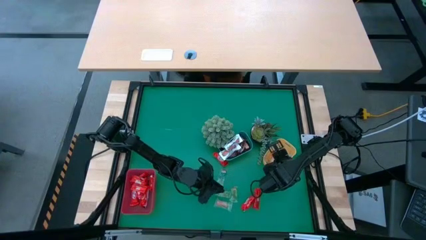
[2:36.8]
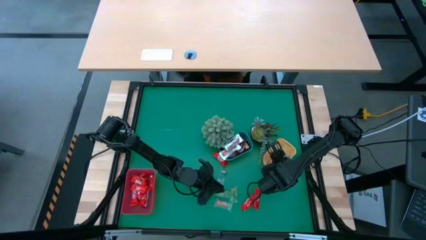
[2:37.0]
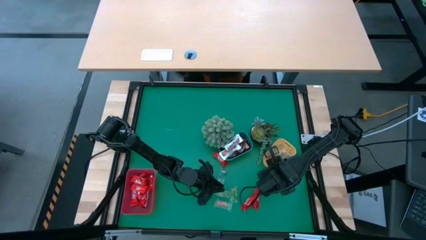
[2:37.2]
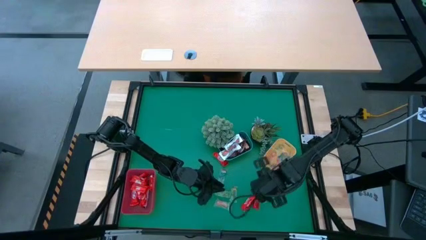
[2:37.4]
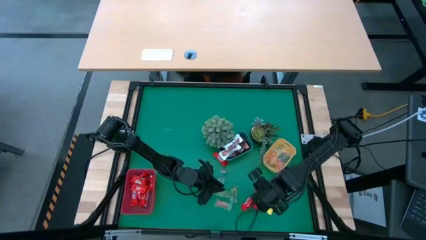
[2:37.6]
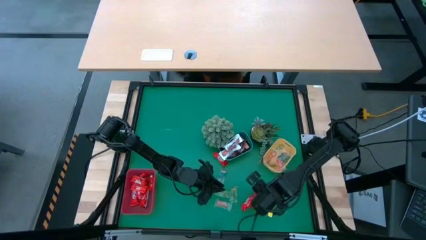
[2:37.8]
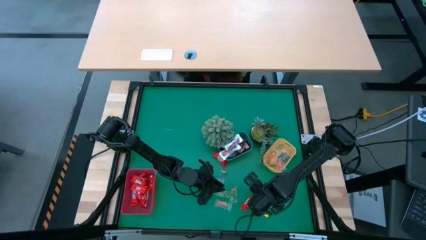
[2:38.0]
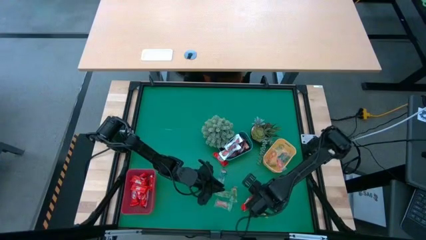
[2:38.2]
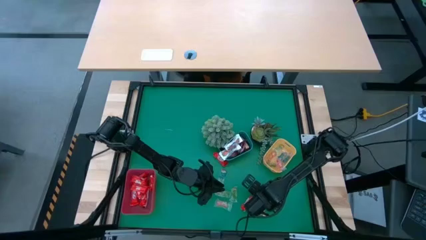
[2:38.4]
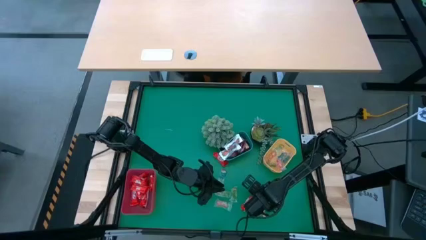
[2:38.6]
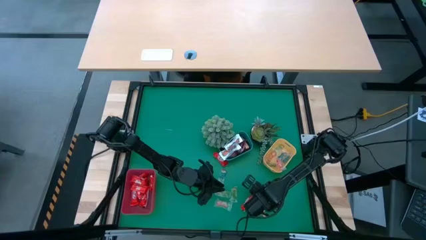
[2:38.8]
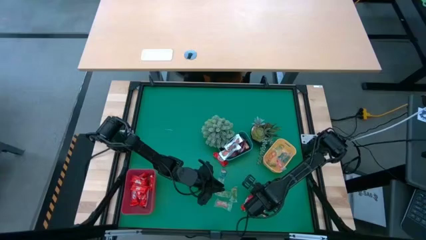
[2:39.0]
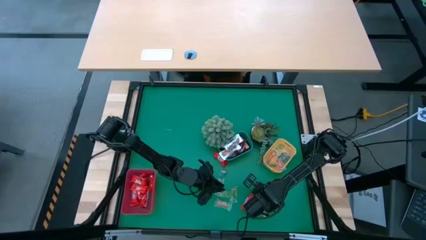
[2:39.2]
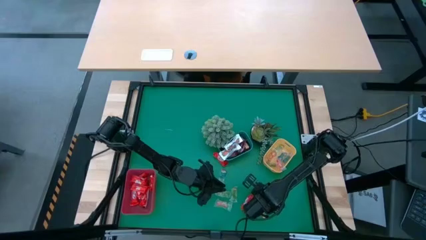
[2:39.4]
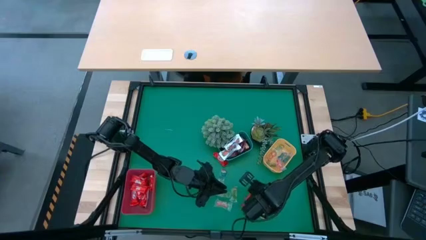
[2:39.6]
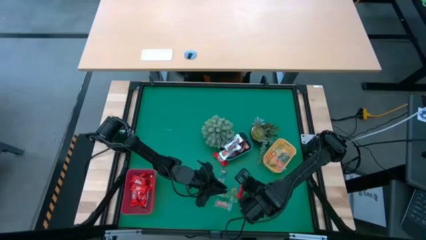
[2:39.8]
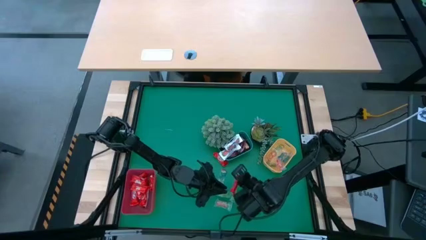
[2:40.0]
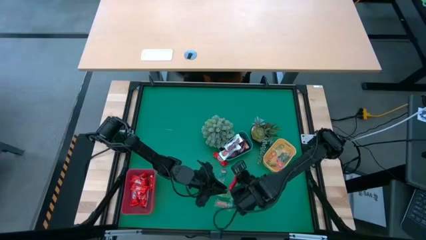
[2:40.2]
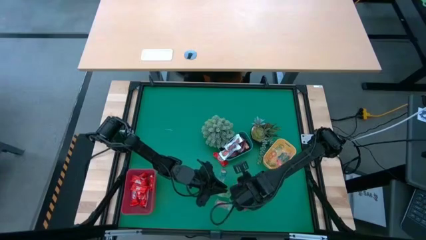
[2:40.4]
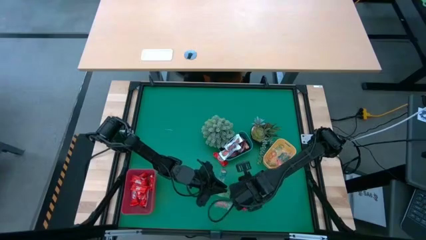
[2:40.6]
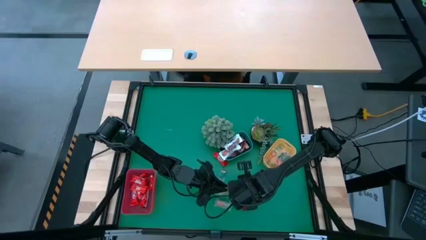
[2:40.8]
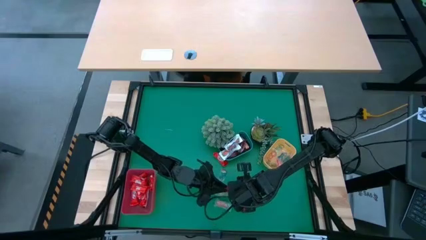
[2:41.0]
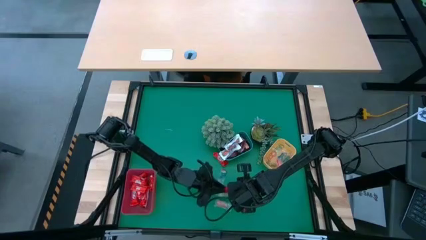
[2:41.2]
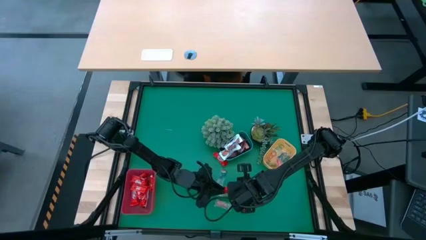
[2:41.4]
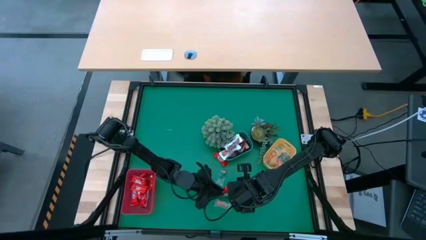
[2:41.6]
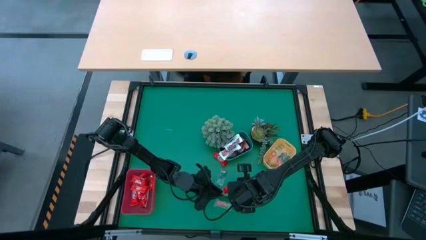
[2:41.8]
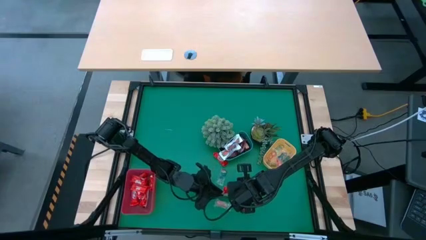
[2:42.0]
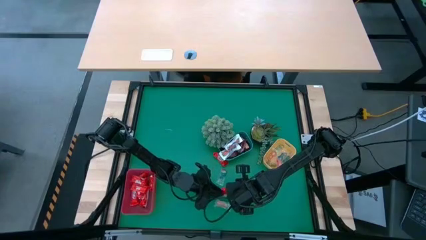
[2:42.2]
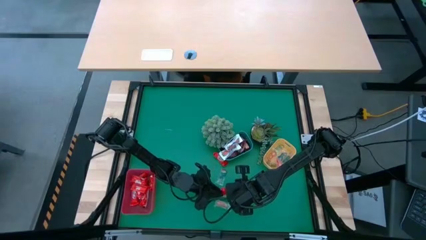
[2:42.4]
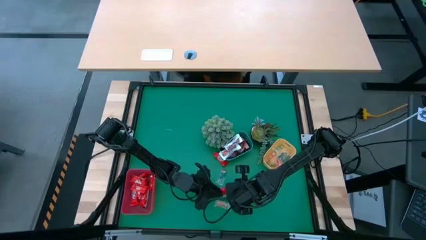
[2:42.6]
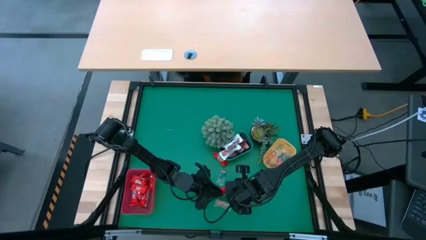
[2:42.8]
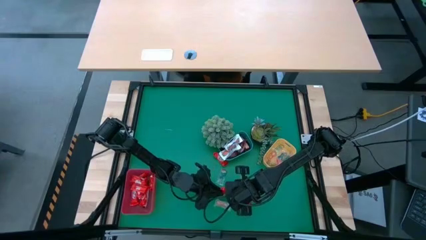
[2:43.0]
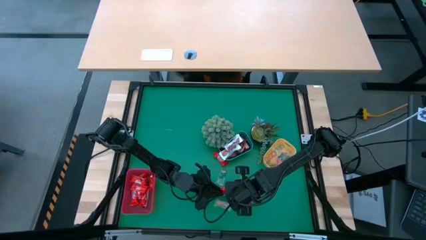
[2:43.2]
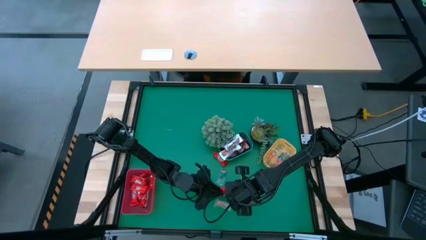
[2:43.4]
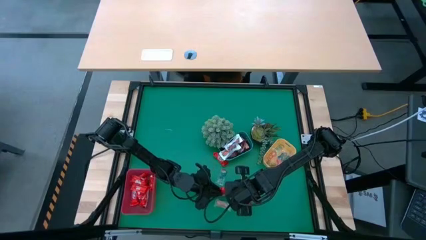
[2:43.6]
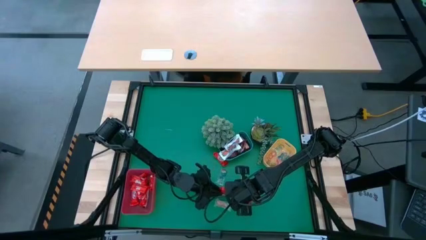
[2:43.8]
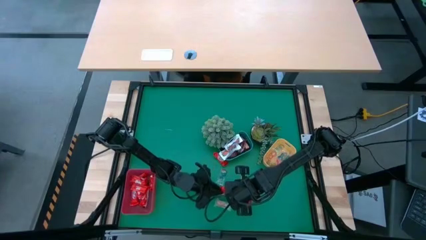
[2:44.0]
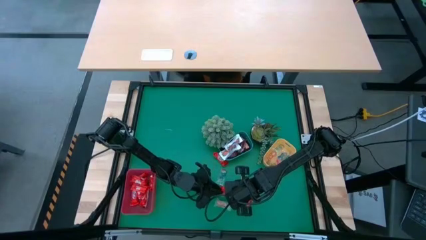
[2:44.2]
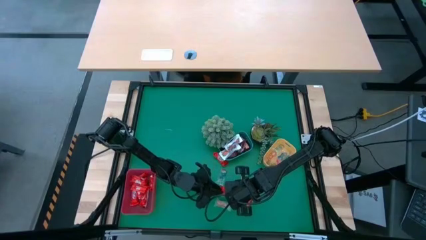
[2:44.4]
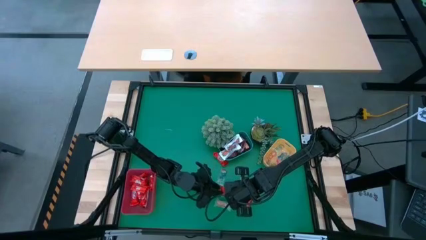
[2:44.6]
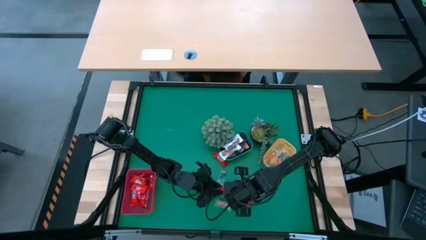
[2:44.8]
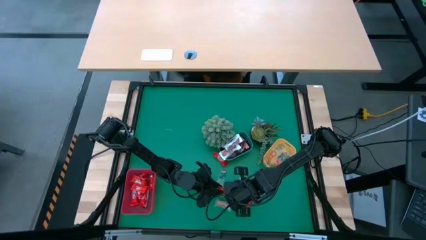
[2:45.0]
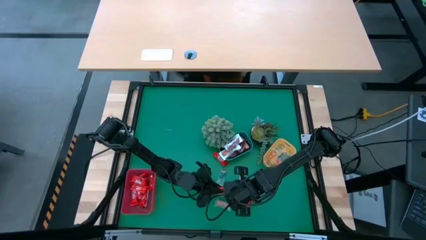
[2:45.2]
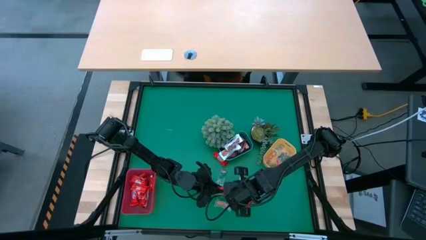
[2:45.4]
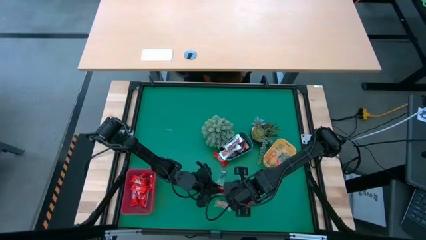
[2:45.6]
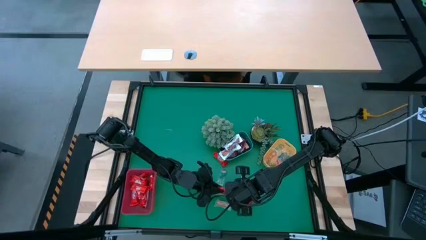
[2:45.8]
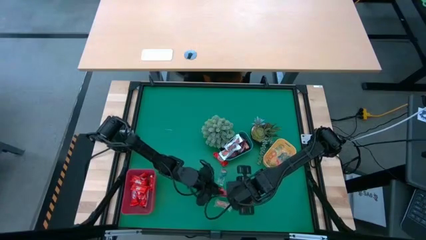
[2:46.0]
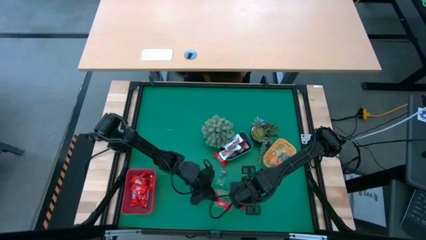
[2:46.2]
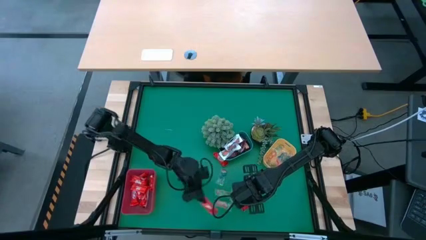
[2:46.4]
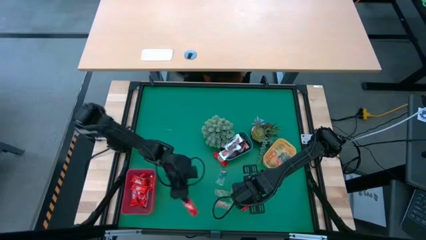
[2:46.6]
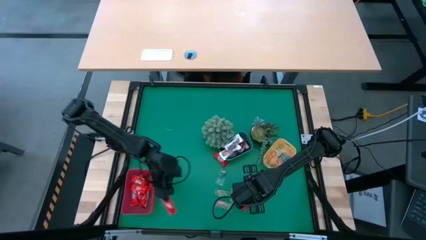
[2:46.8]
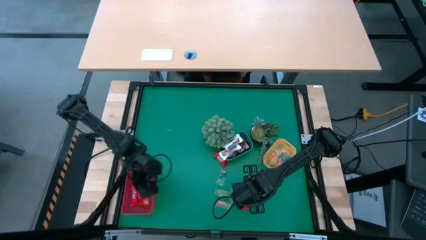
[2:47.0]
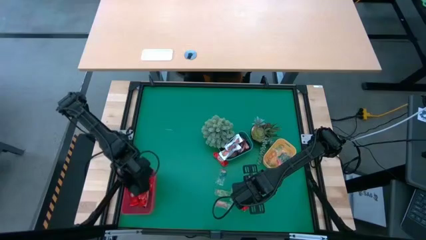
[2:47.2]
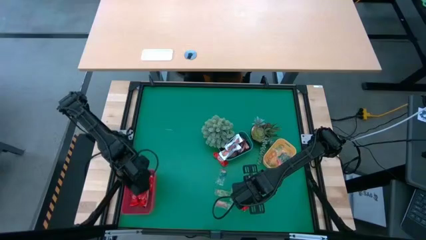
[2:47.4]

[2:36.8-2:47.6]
Task: Organize candy in baskets
Put the red chocolate into the red bin

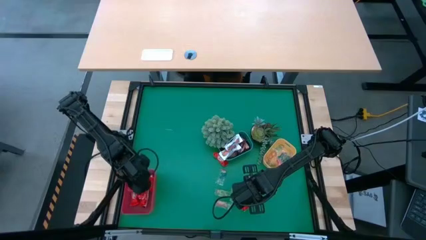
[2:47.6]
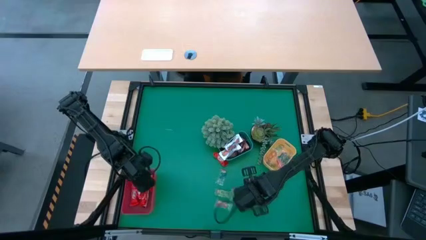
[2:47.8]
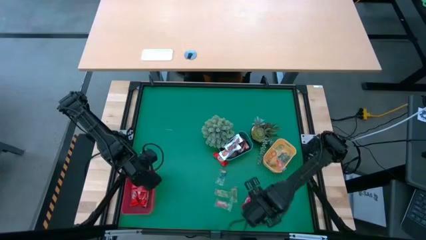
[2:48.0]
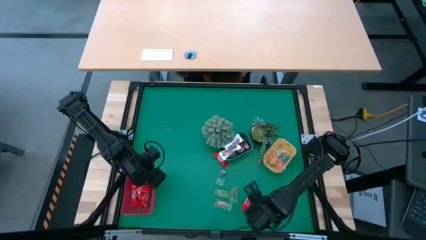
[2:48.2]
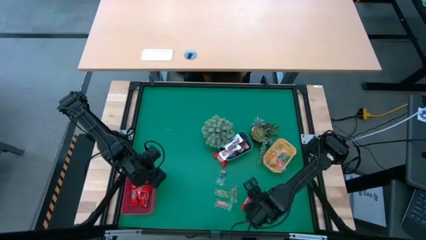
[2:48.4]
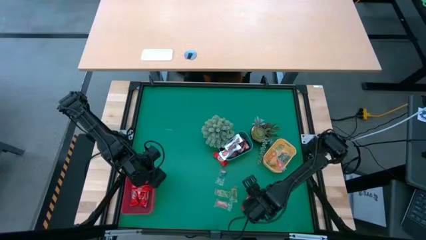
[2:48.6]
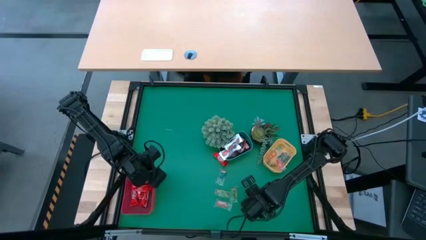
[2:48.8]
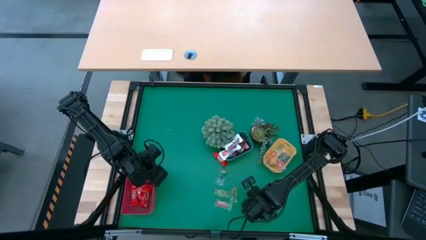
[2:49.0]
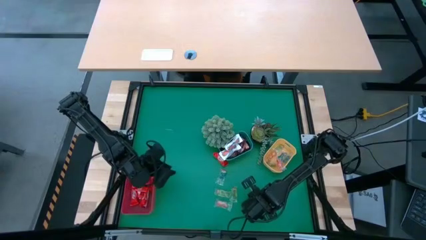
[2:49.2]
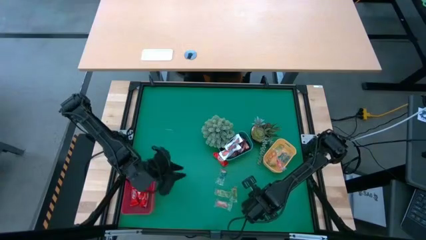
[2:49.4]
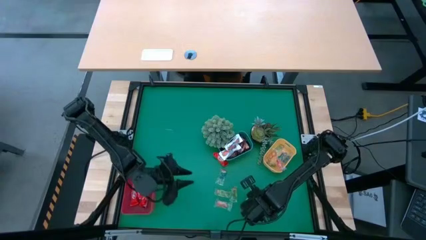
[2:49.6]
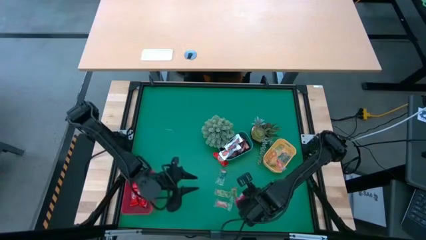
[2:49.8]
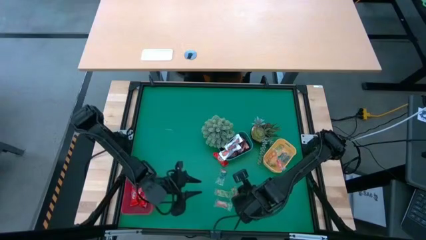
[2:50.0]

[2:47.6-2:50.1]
Put the red chocolate into the red bin

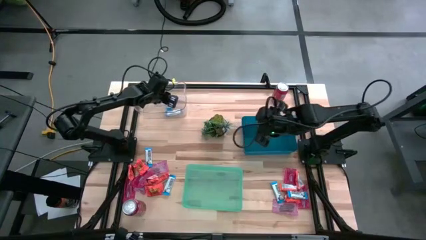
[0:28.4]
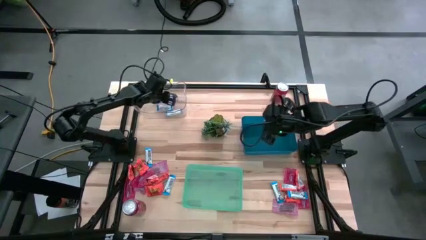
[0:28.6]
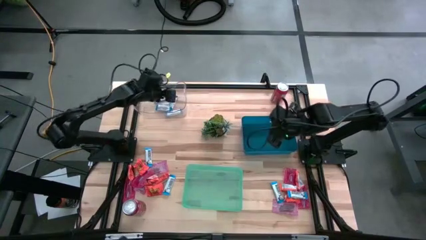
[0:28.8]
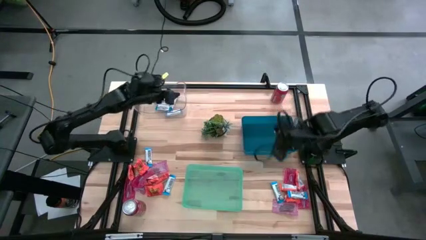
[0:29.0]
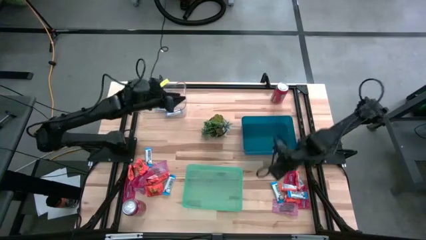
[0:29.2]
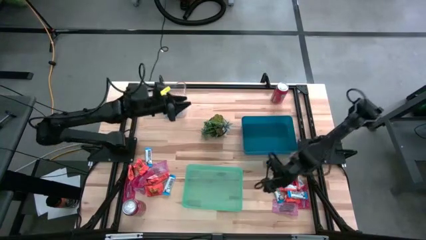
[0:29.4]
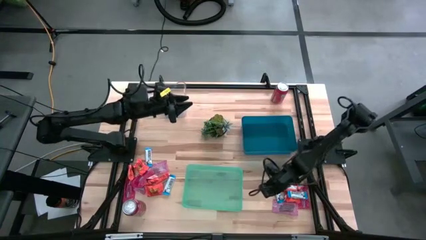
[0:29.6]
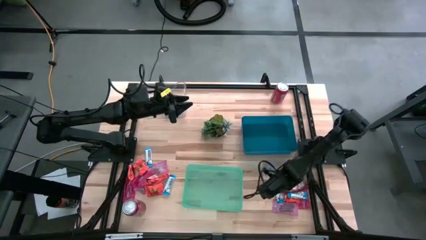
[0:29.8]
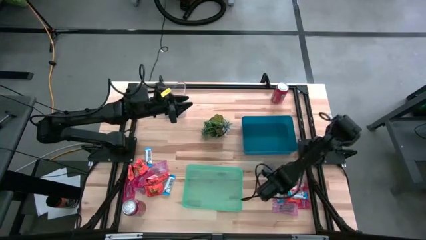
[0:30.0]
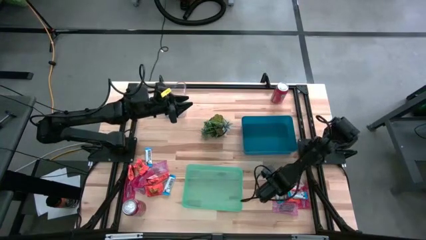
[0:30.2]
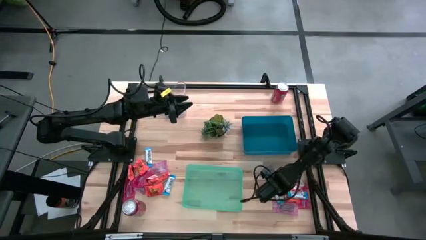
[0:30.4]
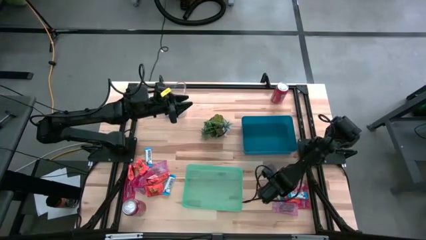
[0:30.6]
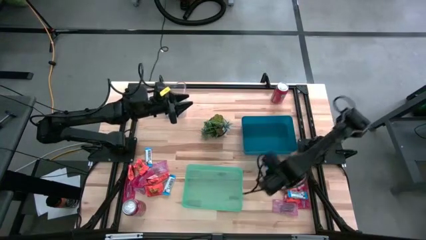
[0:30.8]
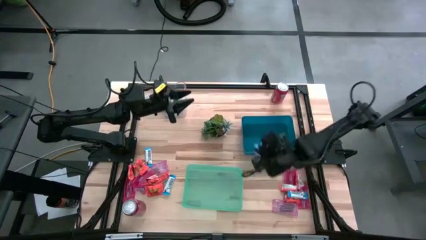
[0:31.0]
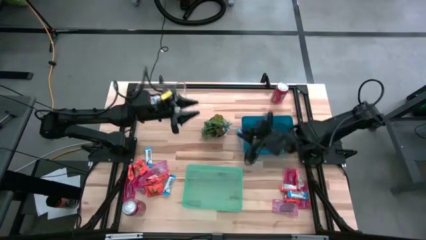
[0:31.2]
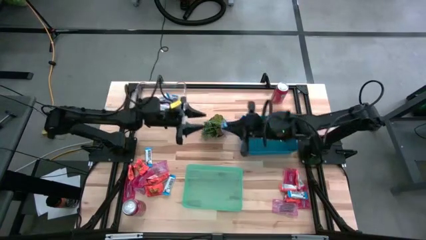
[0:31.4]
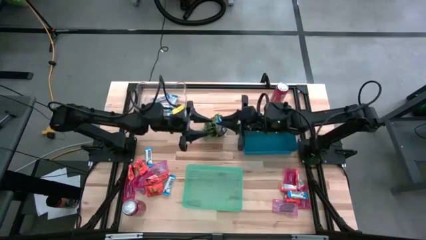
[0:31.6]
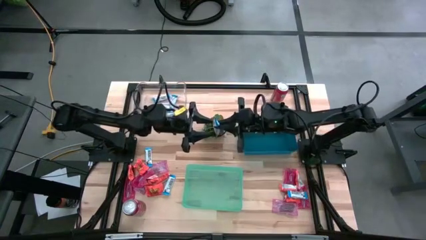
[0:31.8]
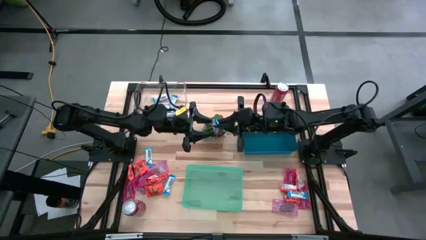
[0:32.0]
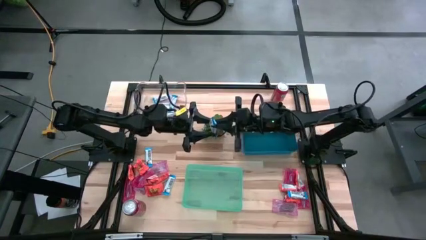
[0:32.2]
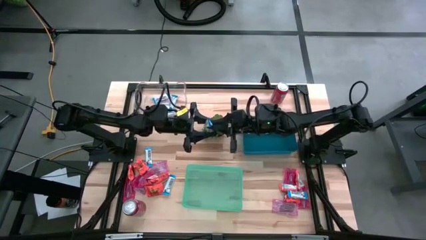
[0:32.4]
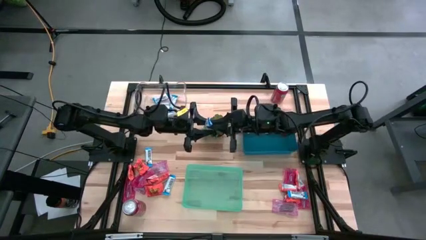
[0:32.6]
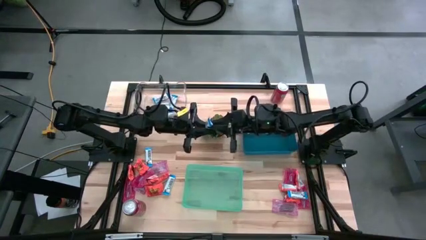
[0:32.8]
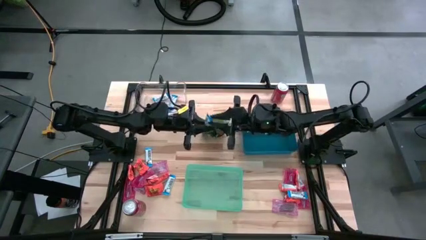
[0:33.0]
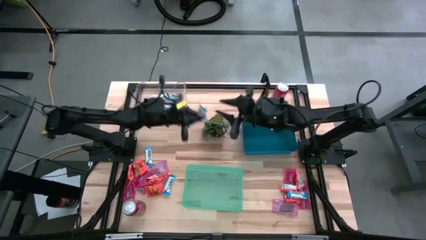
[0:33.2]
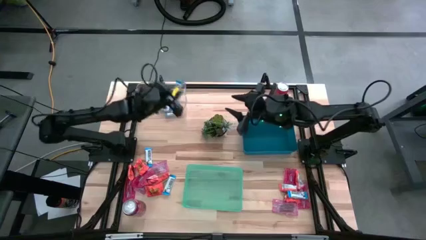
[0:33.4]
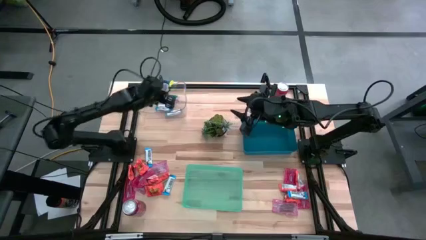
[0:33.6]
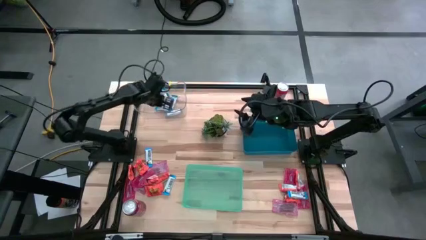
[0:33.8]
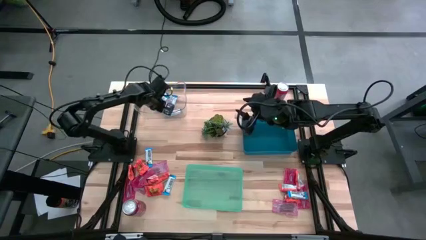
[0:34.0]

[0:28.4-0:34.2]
Task: Sort candy
Put the white chocolate bar into the transparent bin
